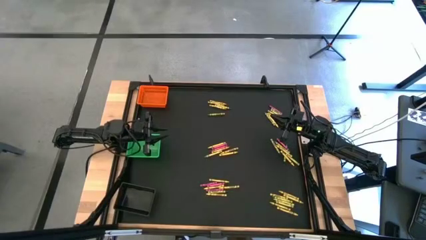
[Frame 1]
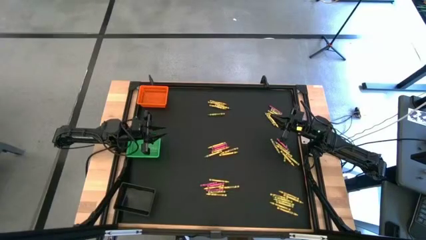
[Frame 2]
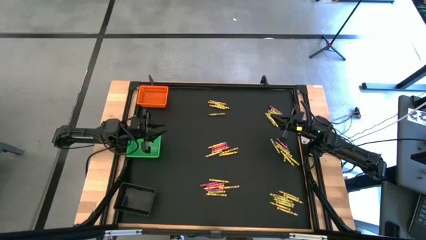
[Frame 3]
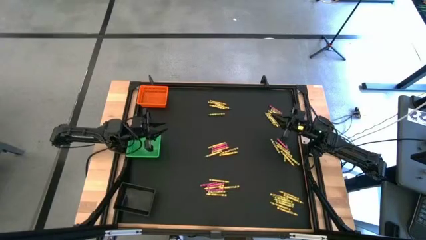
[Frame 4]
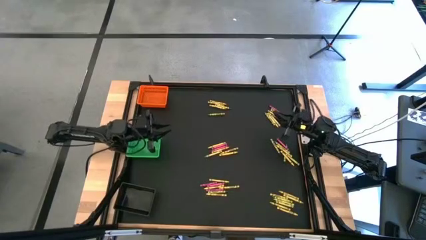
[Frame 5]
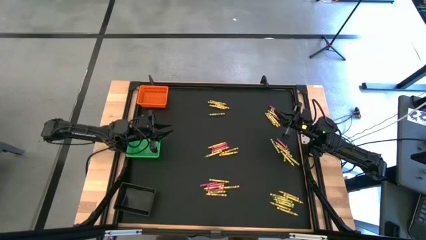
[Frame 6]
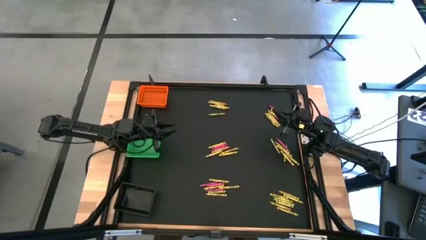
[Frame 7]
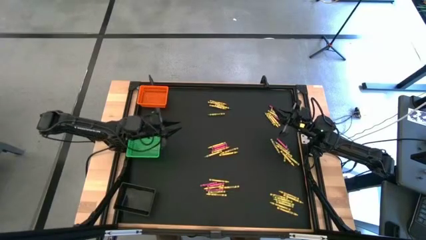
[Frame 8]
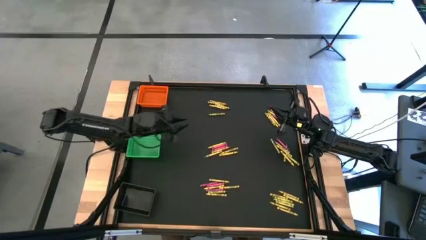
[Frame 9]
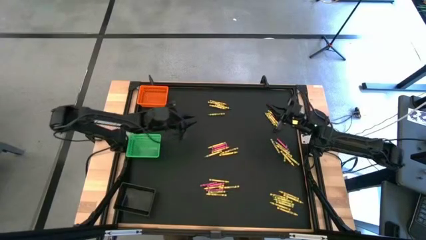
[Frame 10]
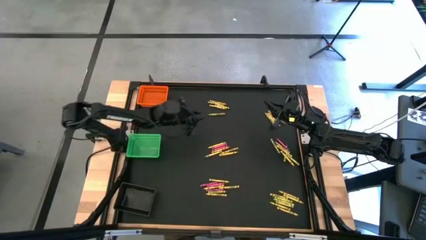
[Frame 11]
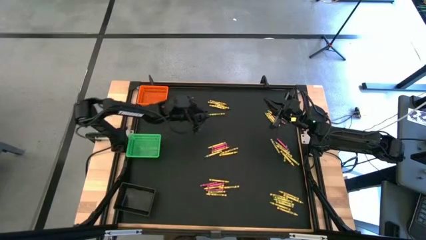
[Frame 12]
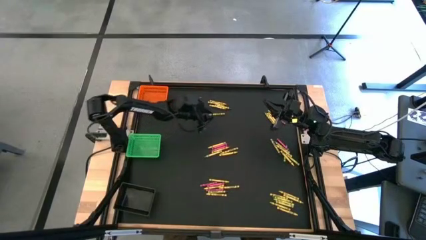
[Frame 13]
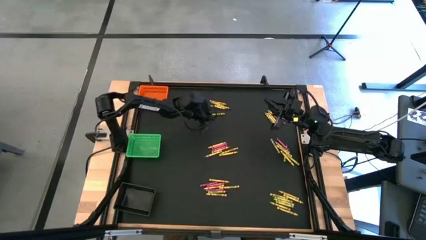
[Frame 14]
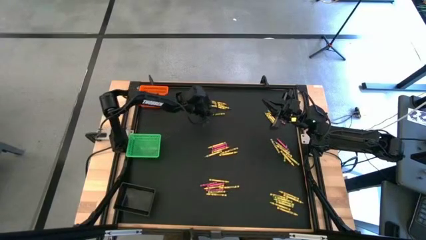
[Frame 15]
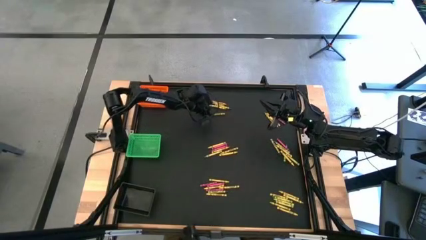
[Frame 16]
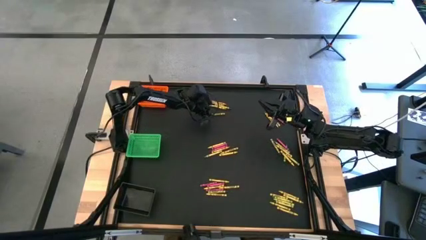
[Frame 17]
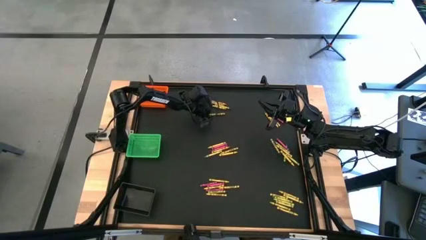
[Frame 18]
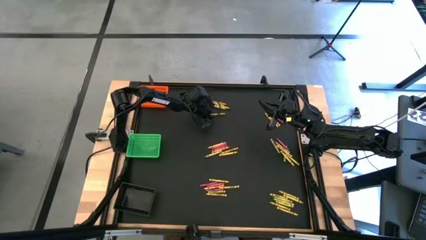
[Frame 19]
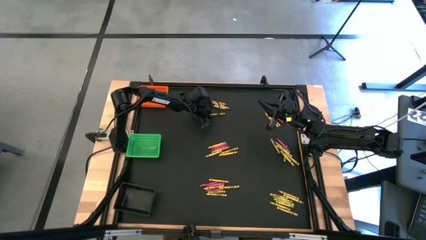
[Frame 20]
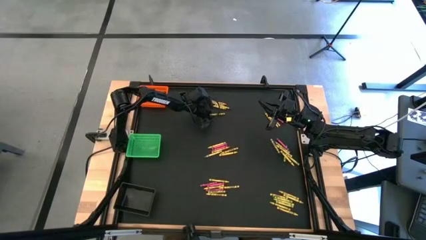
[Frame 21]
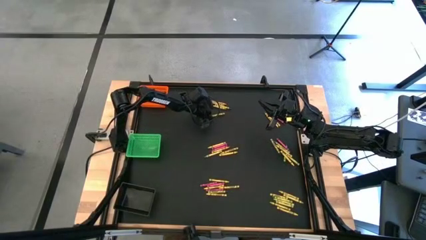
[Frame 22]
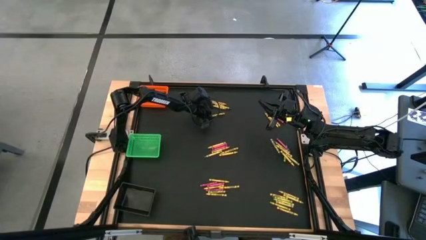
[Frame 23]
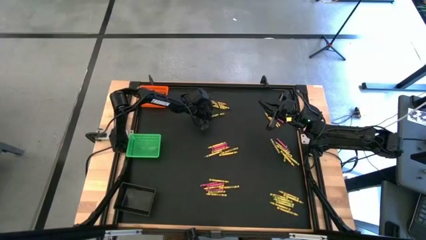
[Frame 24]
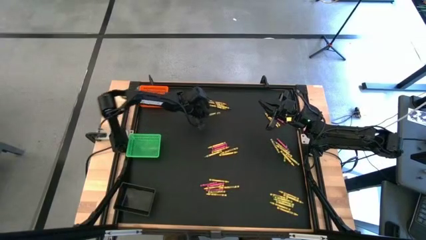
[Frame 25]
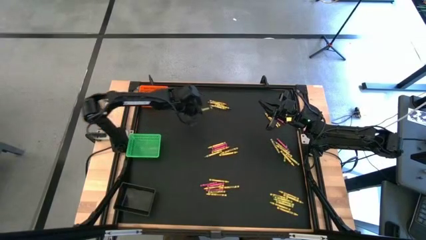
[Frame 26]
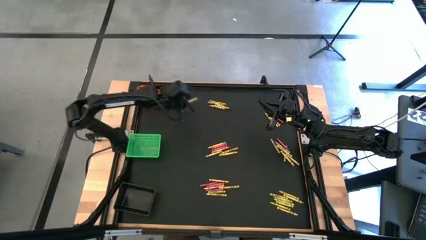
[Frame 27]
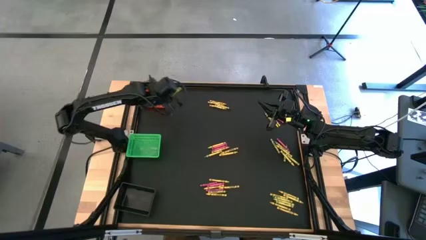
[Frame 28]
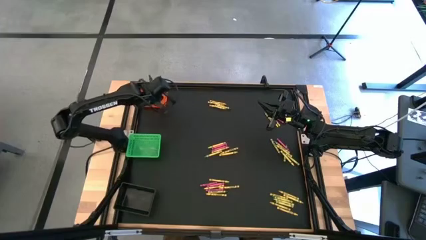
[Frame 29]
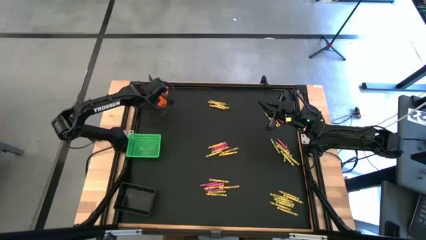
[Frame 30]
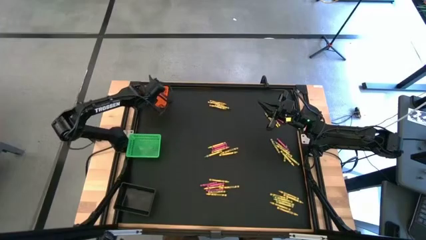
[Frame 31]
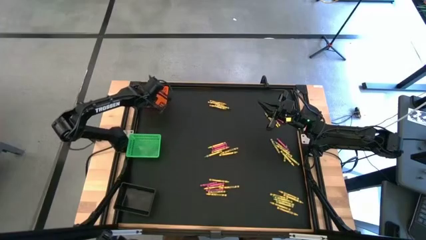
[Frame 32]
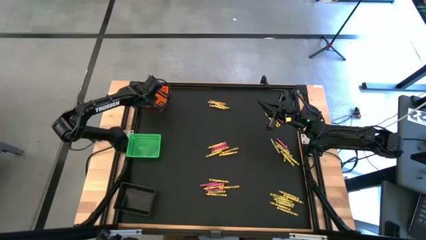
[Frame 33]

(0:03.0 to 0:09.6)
Task: Sort crayons
Put the green crayon into the orange bin

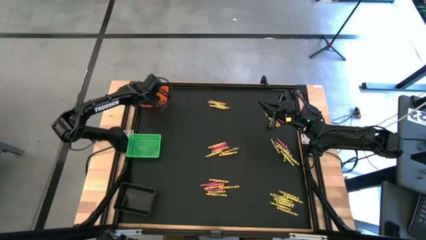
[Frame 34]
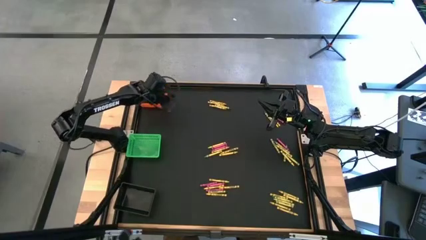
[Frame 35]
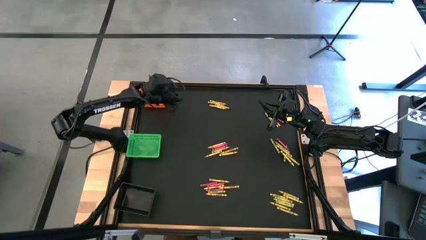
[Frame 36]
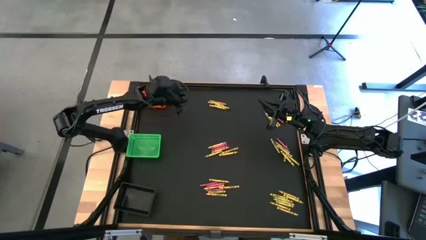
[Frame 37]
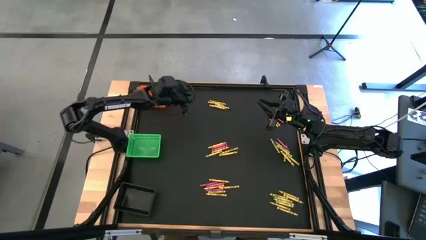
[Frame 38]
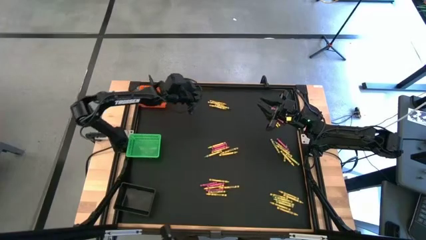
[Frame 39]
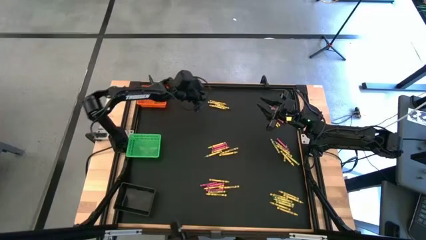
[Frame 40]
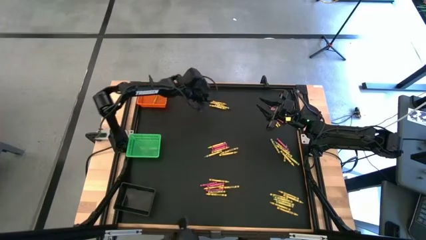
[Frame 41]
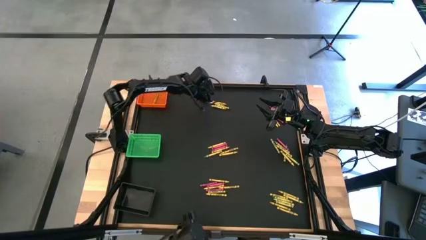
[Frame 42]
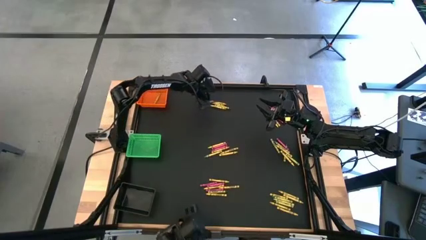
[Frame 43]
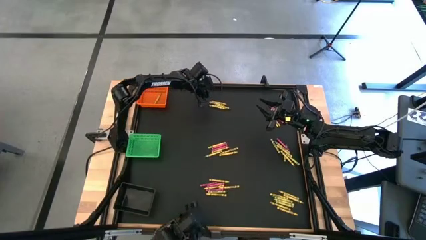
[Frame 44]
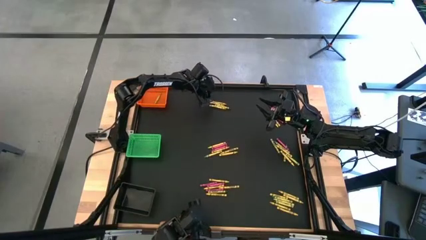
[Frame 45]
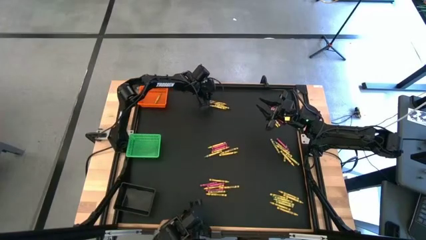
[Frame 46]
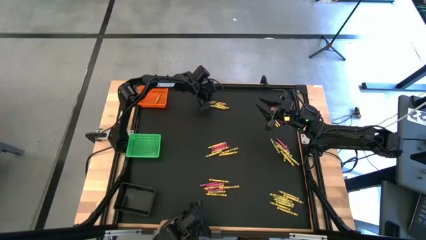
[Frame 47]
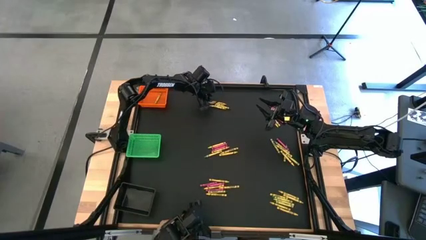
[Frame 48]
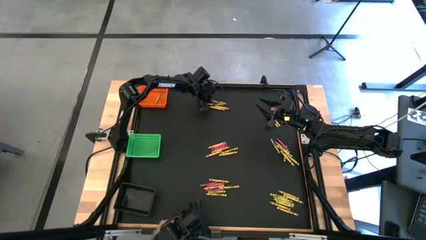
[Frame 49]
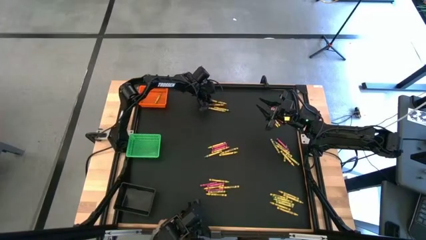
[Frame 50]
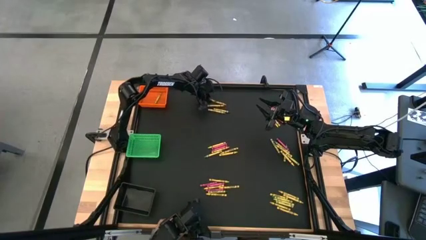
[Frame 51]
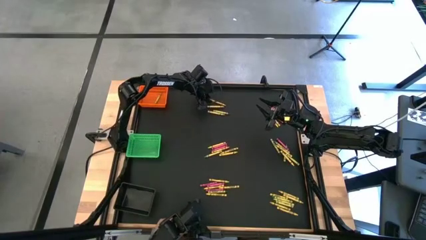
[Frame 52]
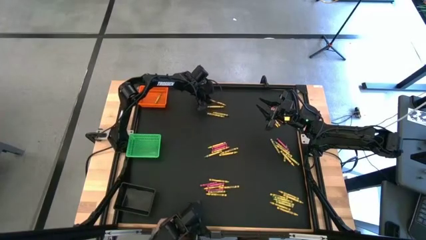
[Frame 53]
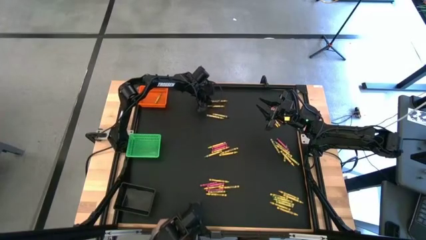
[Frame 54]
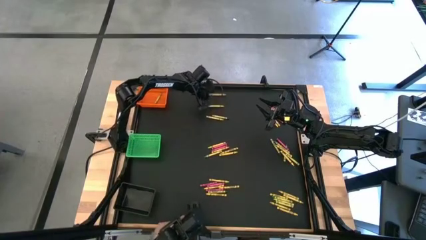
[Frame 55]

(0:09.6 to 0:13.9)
Put the yellow crayon into the green bin

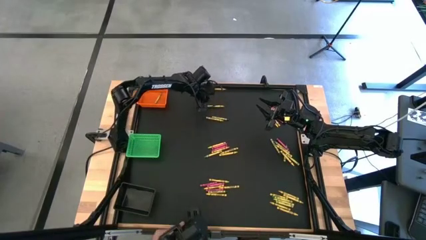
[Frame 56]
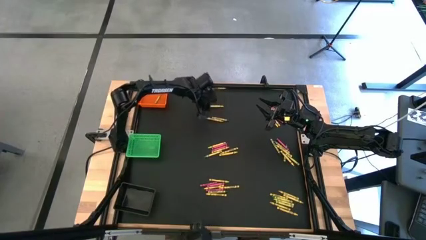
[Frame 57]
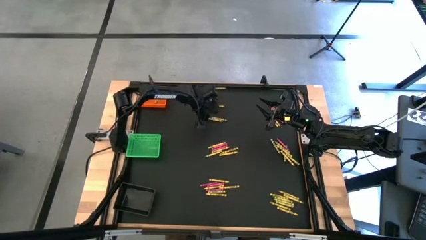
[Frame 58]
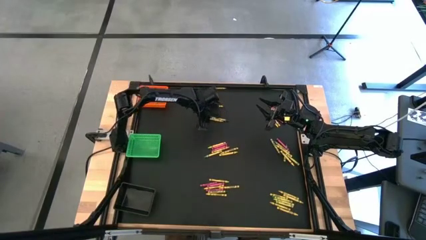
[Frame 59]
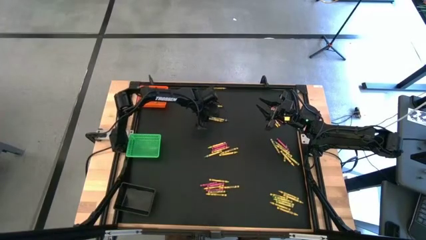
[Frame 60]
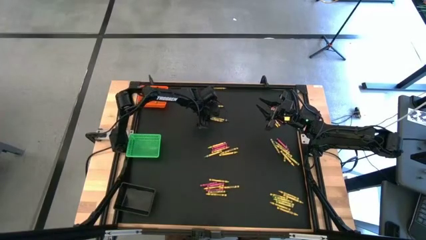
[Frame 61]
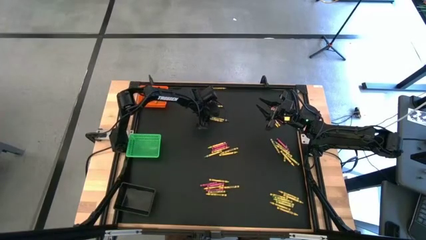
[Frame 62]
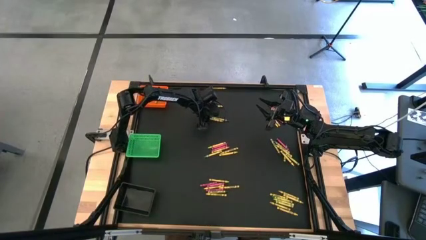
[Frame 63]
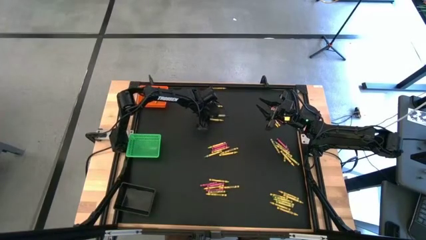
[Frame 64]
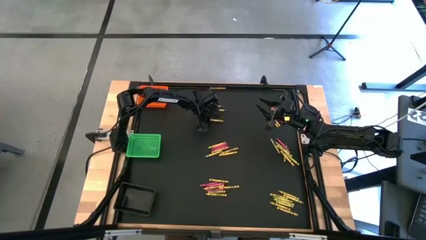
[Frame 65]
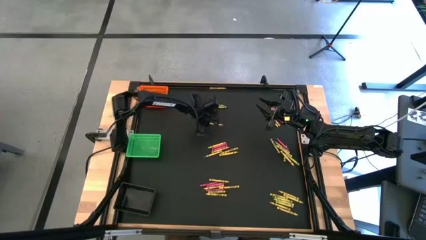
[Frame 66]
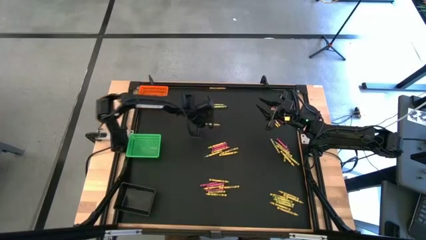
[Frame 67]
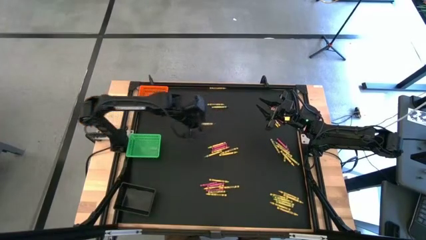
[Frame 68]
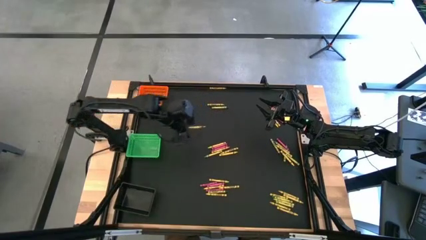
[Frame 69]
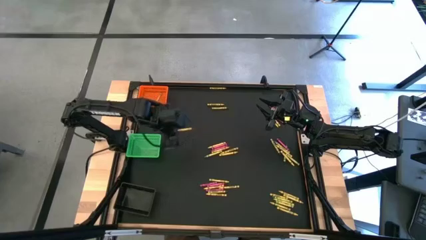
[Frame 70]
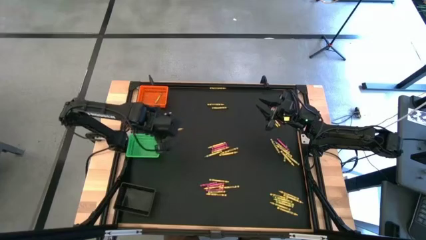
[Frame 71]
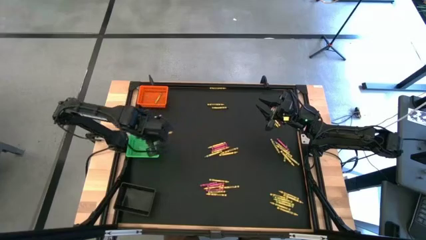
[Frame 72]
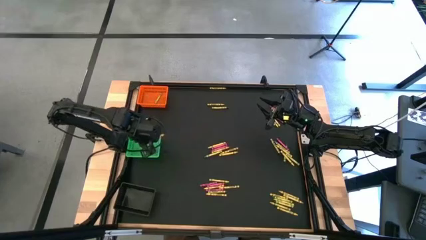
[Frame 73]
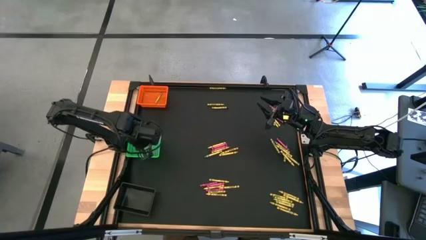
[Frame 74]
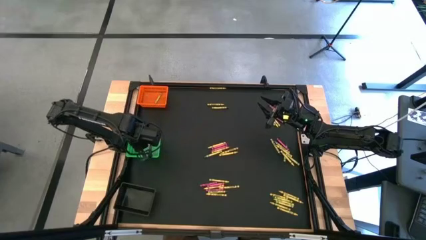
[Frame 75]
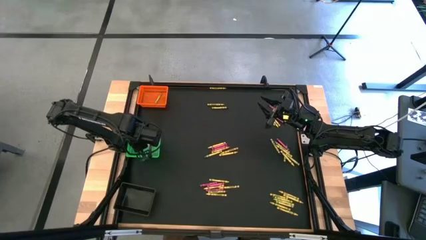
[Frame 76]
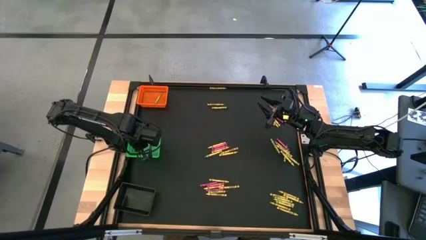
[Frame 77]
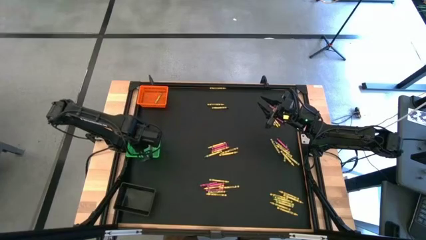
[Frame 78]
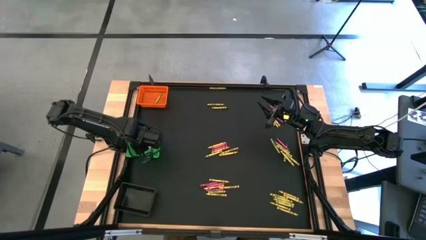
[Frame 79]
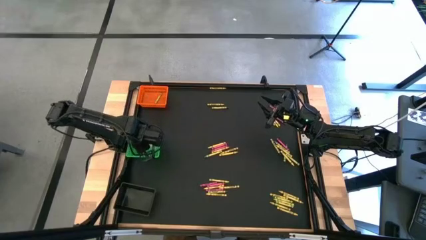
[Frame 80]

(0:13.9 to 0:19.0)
Put the yellow crayon into the green bin
